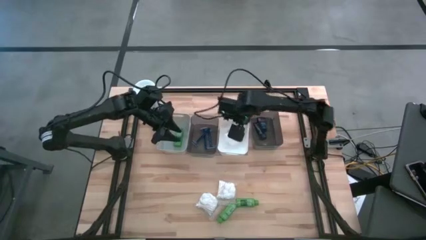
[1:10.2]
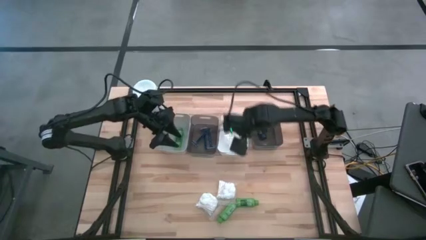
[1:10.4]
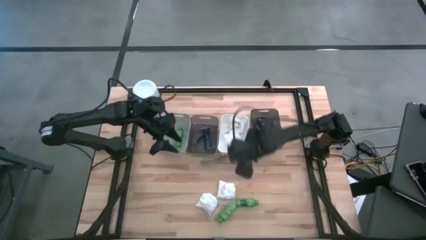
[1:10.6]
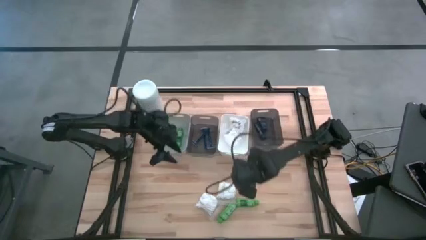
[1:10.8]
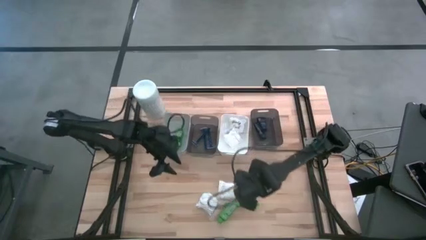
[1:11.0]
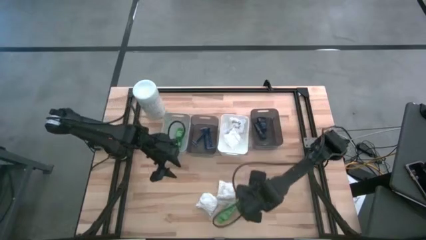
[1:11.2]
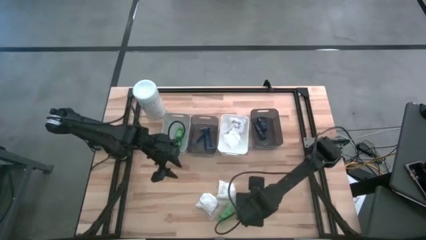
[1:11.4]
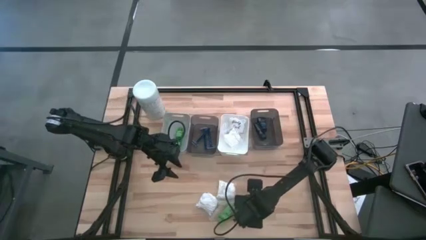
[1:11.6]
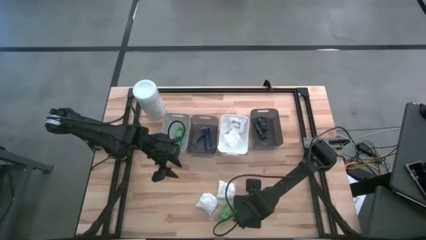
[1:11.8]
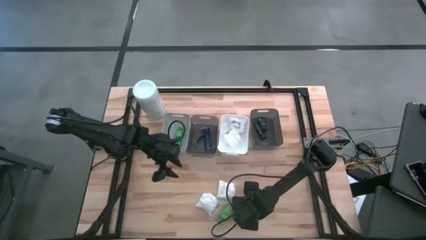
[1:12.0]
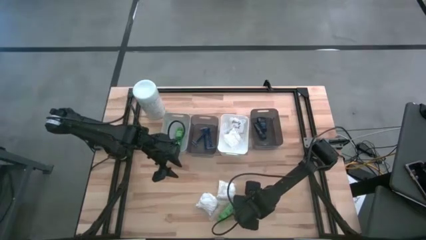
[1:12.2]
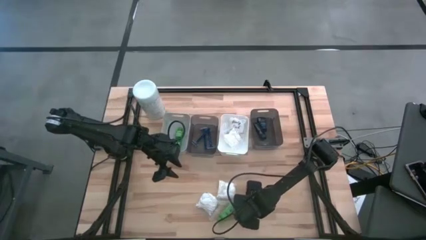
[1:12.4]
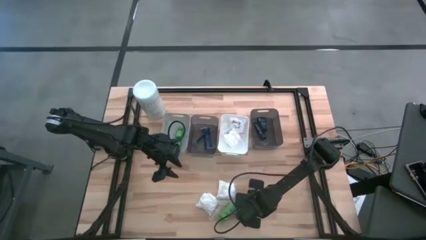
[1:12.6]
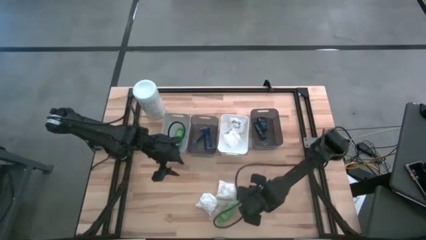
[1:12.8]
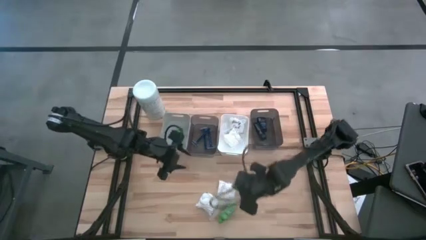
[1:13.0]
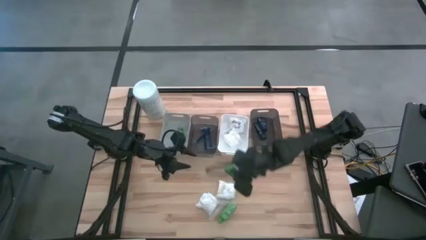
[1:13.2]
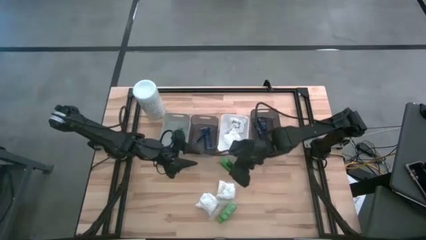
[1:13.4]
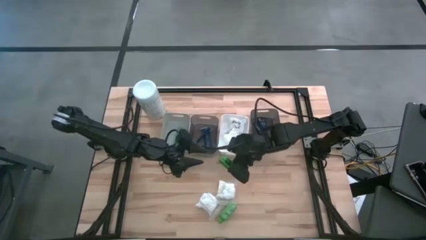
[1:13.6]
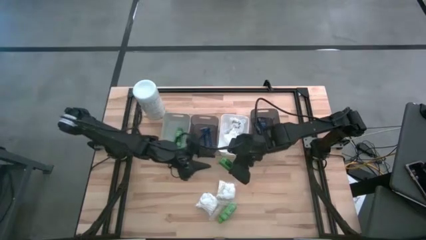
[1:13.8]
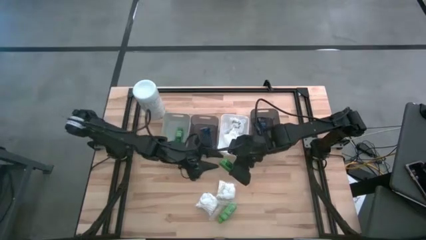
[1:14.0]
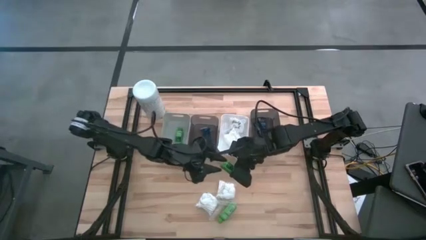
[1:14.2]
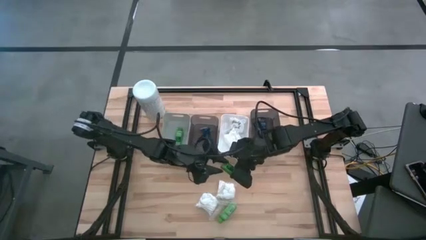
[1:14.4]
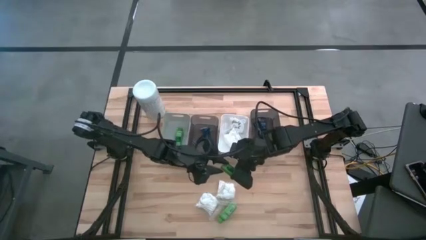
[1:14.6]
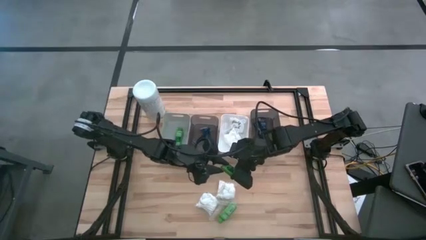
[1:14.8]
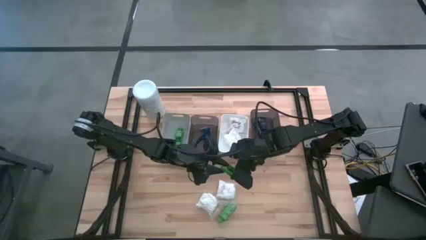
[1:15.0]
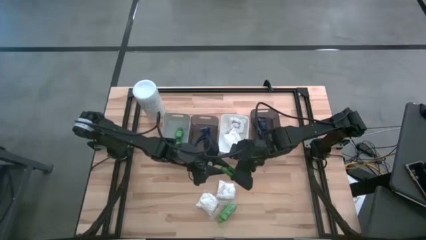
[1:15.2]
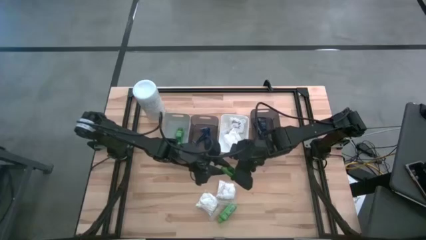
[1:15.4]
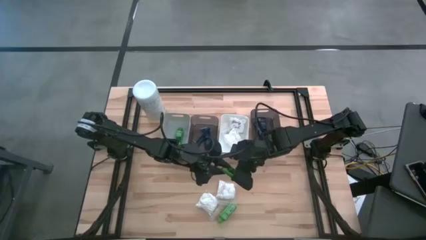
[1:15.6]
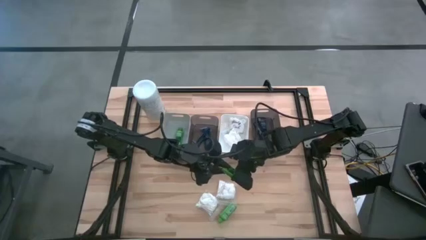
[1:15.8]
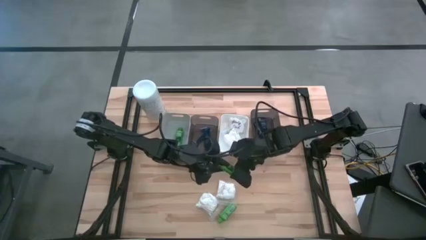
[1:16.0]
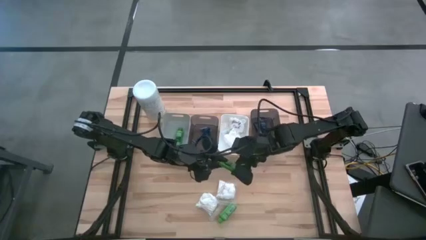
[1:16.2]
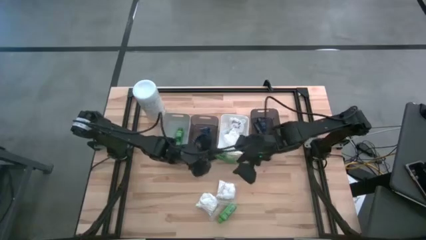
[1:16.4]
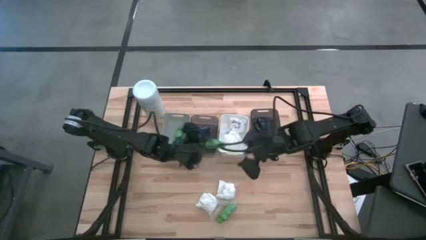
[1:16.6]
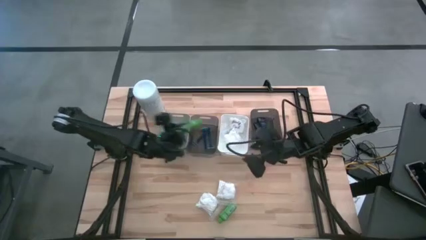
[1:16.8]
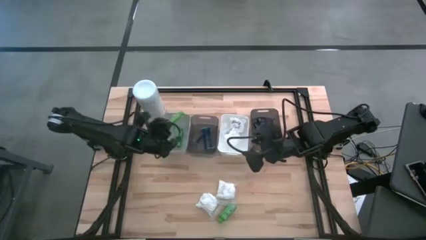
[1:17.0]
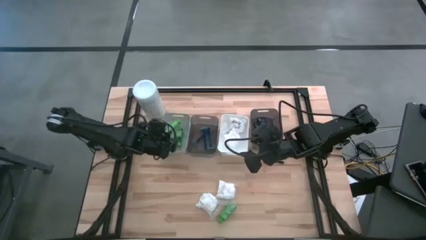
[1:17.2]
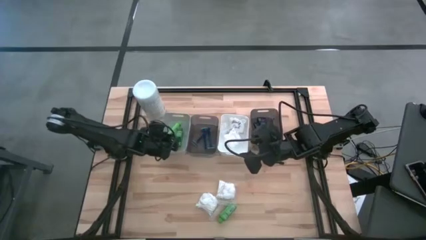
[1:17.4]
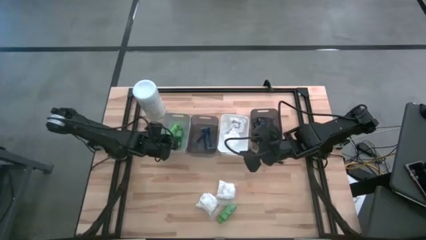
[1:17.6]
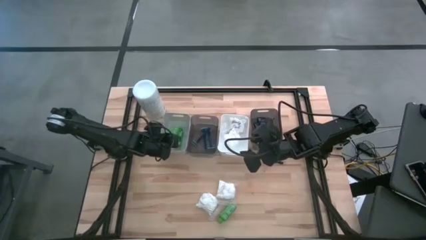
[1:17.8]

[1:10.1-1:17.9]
Task: Pick & Place Travel size toiletries
Put the green shampoo into the gray bin

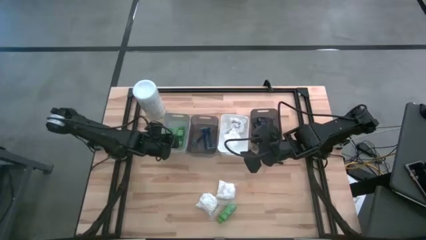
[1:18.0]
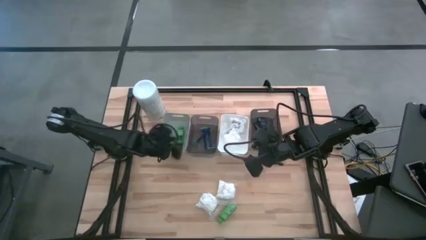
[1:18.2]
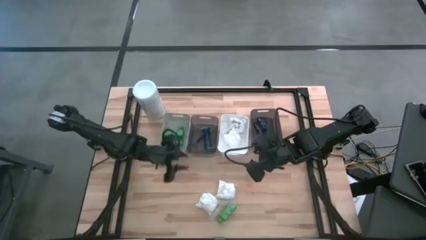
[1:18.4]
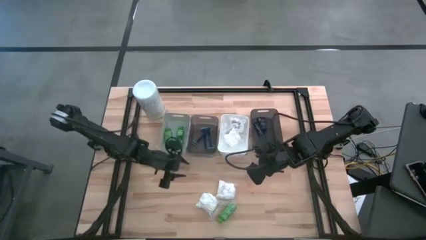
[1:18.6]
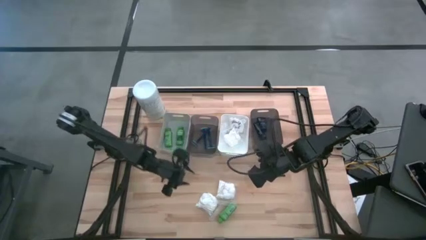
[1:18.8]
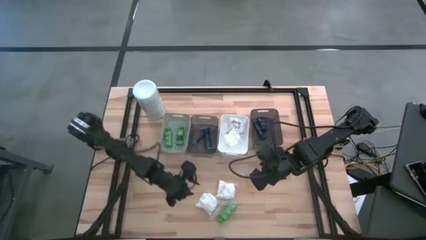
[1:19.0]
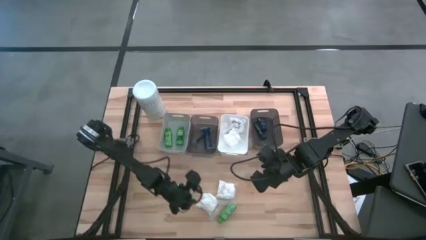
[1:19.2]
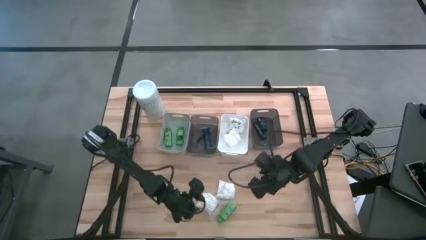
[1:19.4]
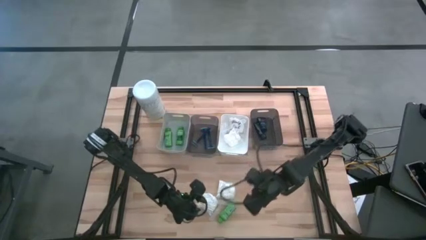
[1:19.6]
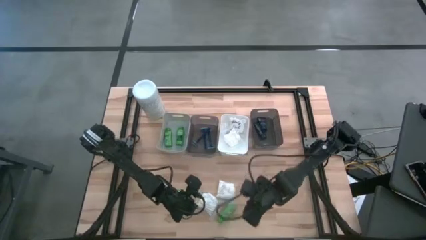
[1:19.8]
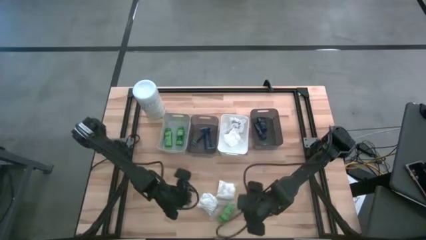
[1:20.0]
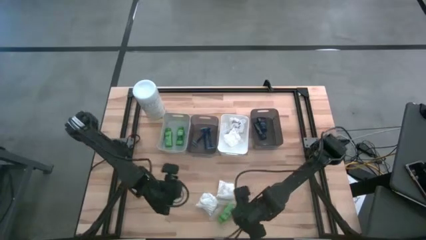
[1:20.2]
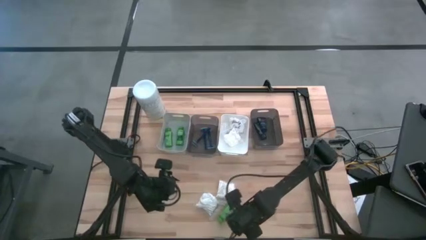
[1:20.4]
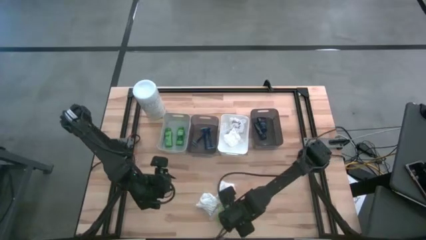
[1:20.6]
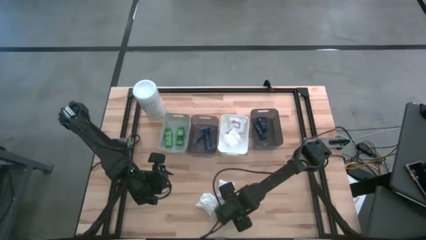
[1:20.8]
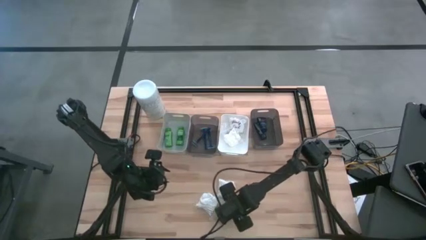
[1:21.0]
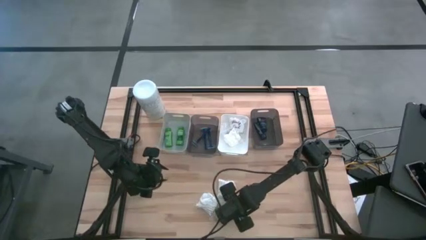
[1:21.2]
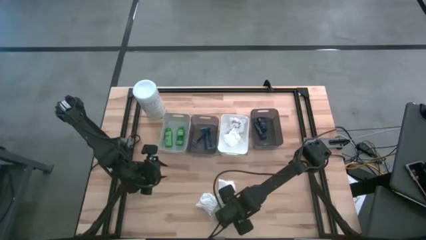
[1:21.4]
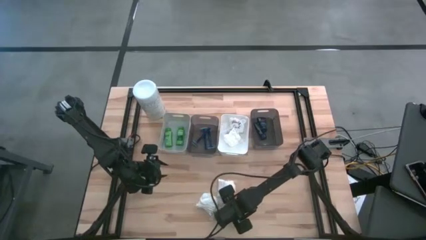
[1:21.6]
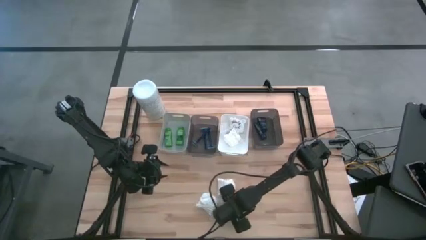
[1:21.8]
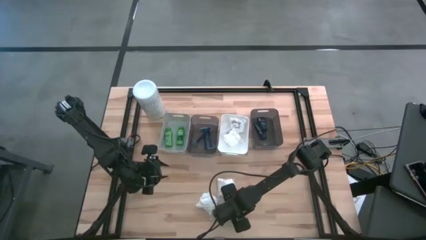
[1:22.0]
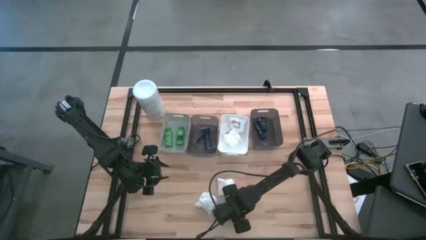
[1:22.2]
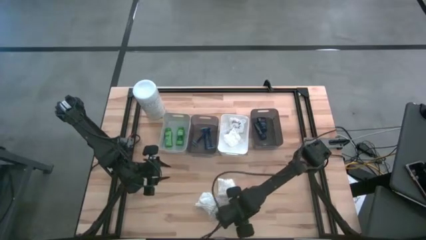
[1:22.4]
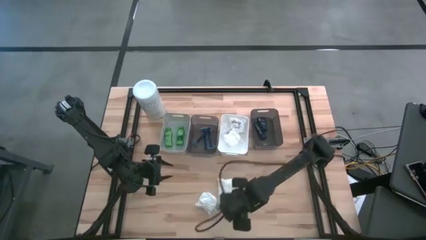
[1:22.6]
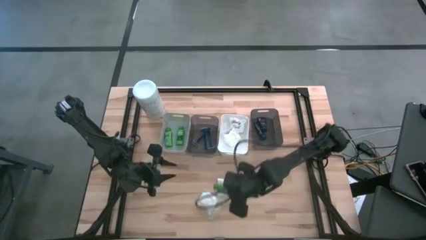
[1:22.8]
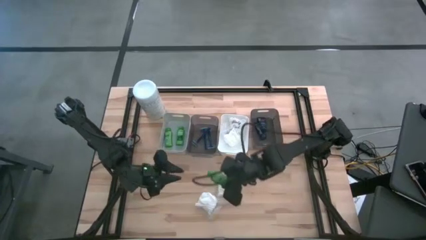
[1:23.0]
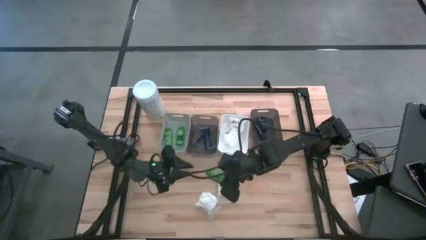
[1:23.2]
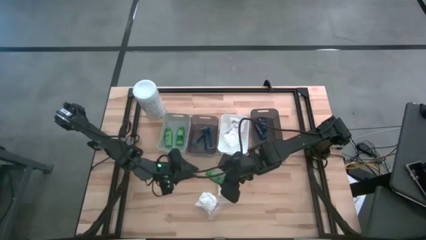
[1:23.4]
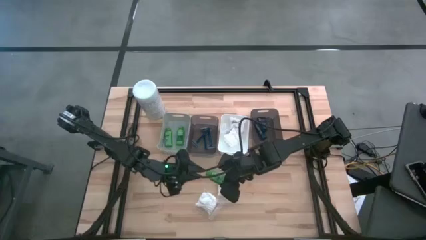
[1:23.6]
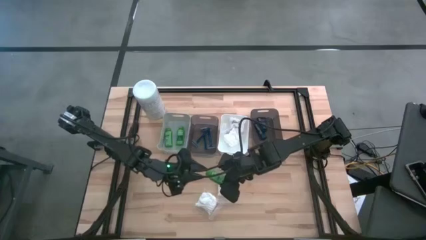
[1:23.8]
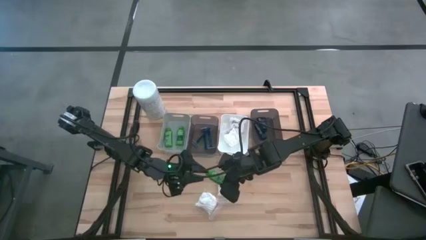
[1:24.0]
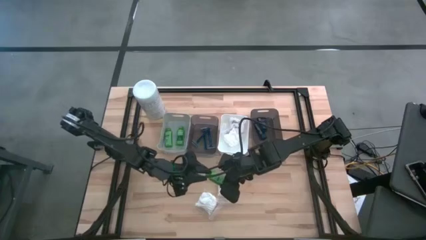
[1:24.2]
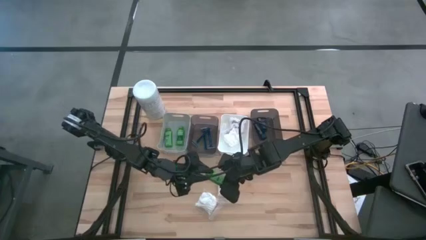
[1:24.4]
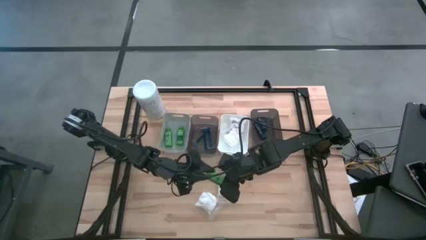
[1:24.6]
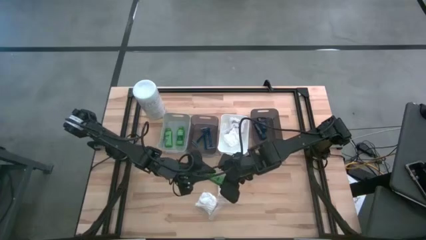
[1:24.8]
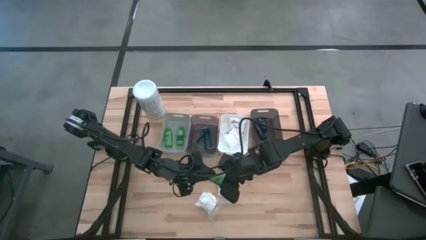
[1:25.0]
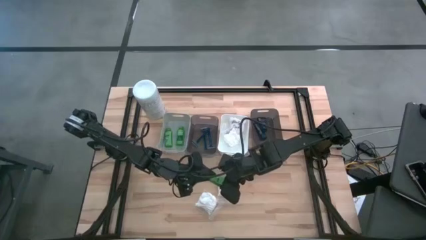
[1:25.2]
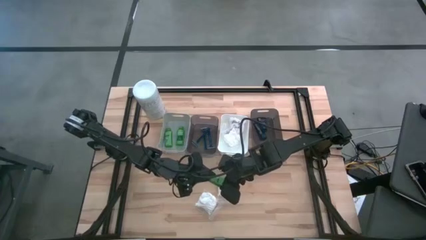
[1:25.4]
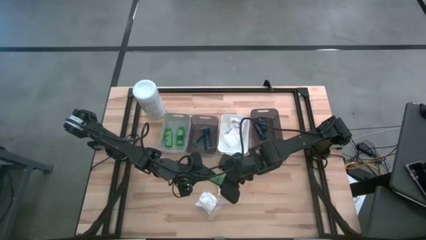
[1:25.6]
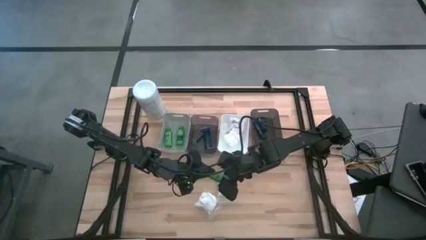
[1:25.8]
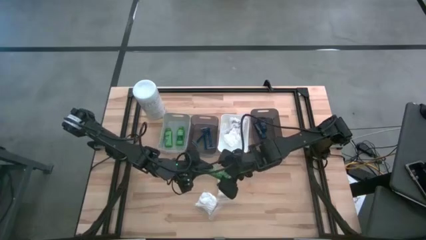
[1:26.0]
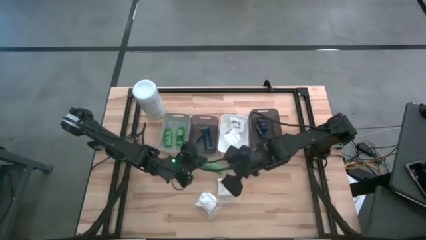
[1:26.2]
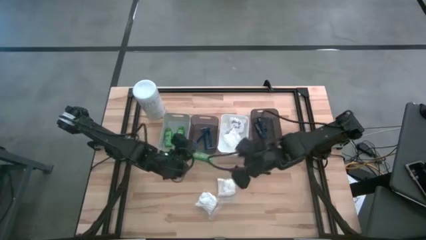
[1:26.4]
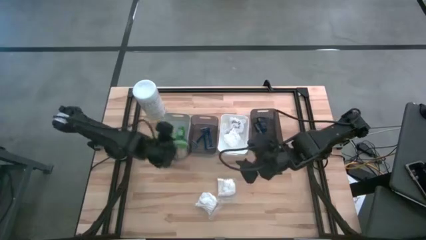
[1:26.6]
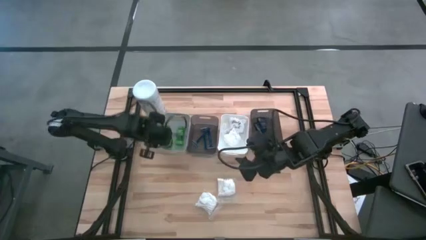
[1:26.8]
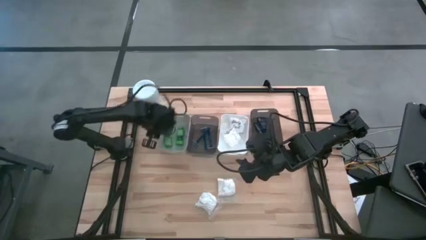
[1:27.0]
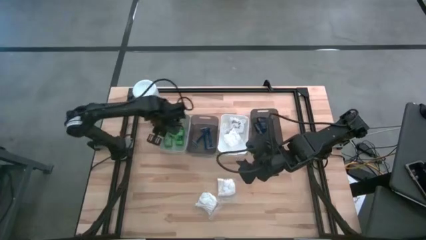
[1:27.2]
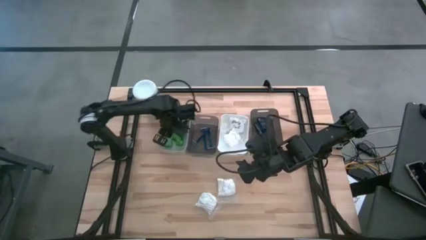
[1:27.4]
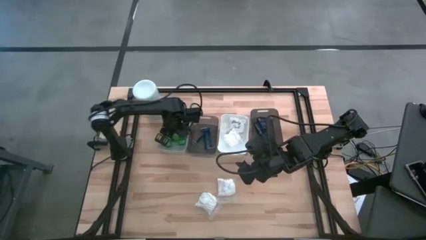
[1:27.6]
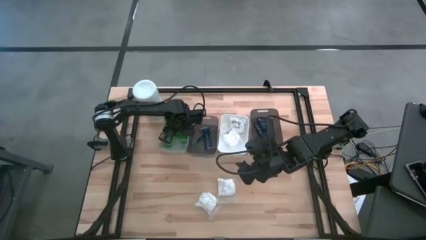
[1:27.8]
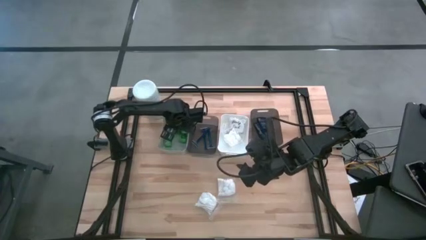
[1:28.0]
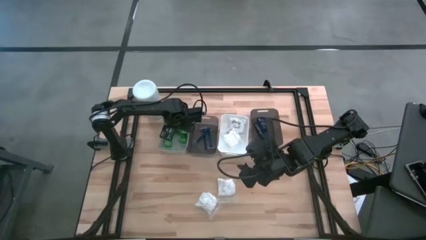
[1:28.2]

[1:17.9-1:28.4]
Put the green shampoo into the gray bin
